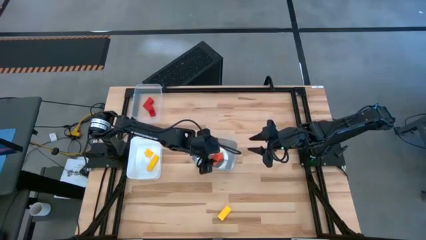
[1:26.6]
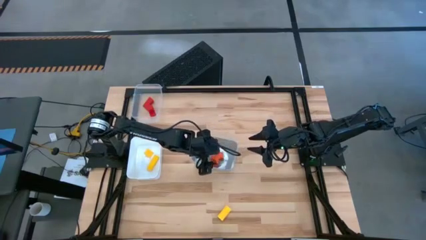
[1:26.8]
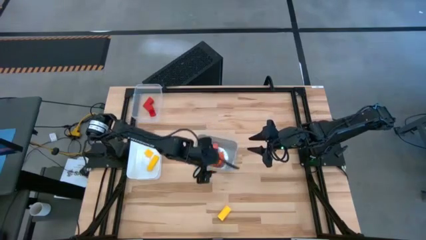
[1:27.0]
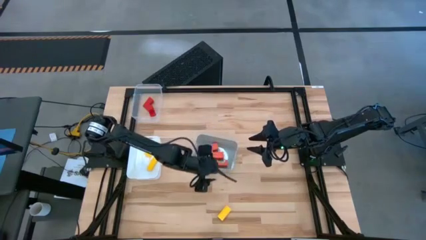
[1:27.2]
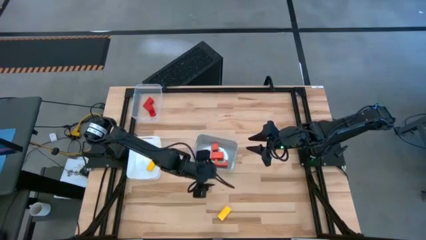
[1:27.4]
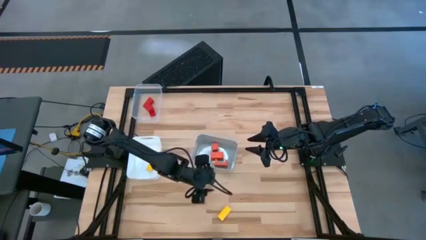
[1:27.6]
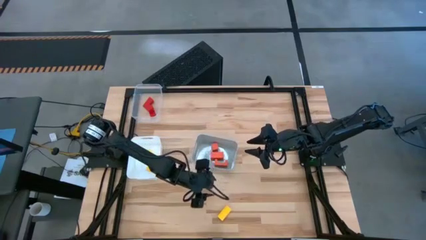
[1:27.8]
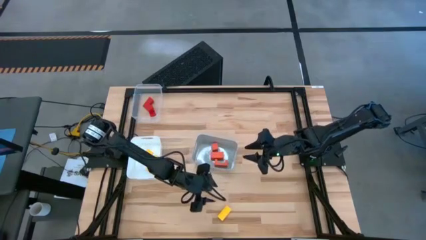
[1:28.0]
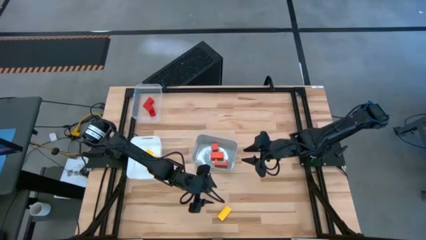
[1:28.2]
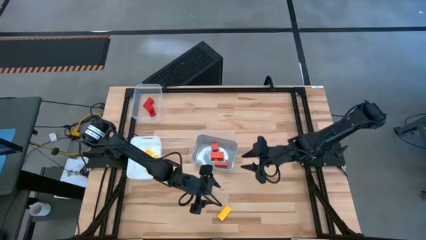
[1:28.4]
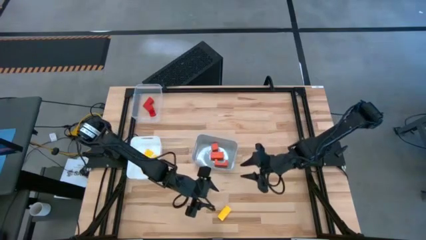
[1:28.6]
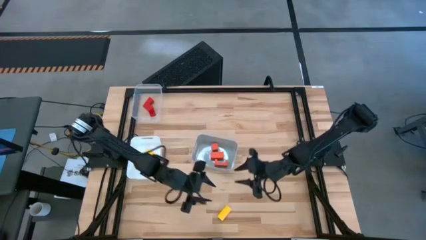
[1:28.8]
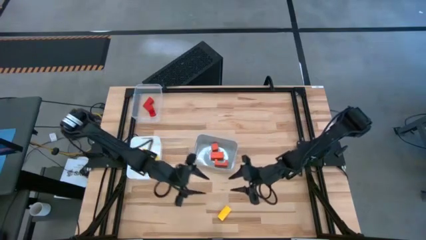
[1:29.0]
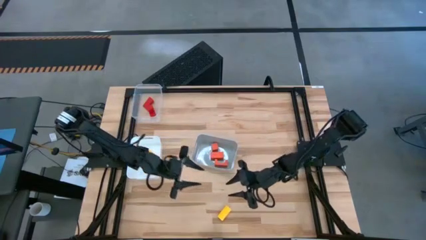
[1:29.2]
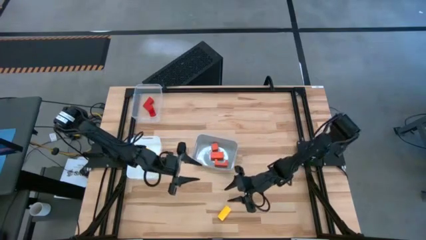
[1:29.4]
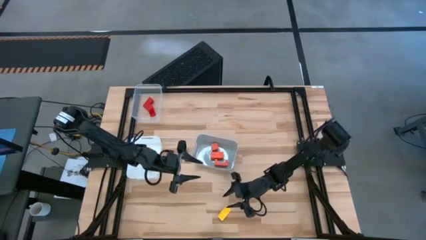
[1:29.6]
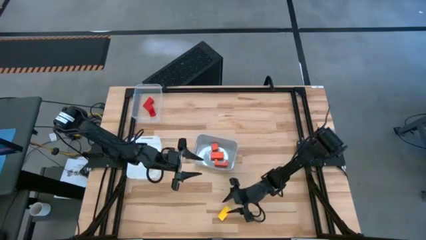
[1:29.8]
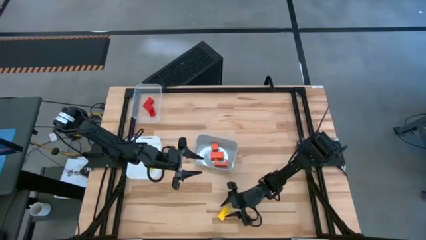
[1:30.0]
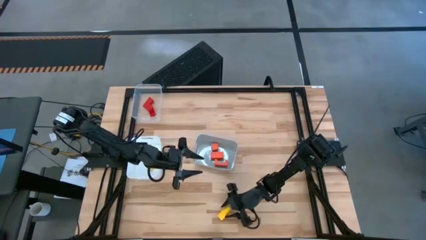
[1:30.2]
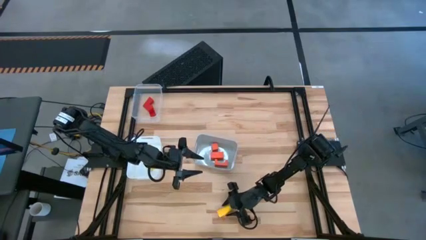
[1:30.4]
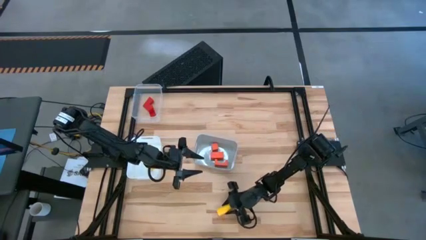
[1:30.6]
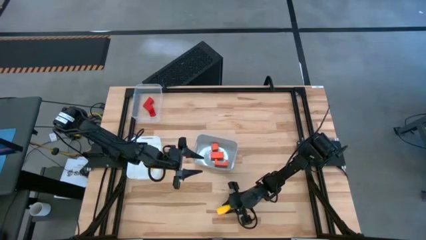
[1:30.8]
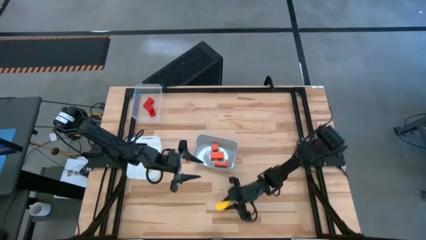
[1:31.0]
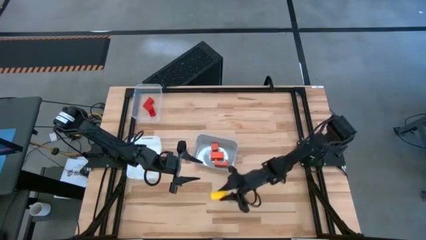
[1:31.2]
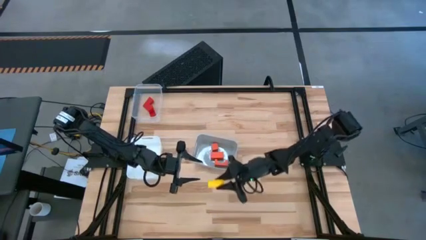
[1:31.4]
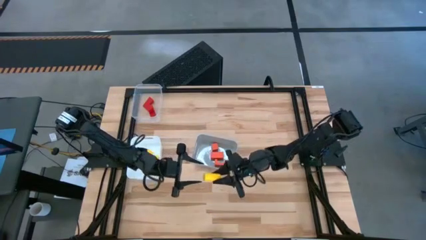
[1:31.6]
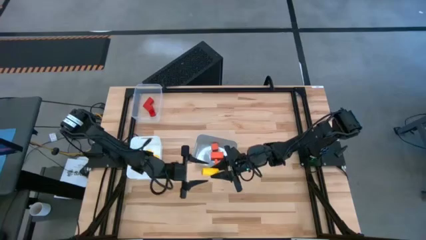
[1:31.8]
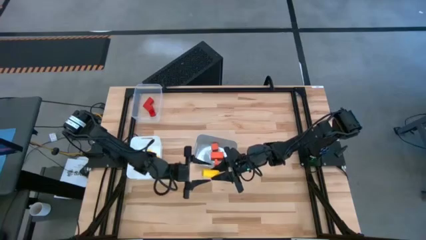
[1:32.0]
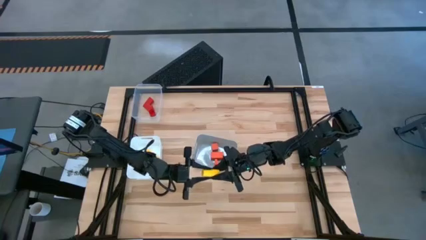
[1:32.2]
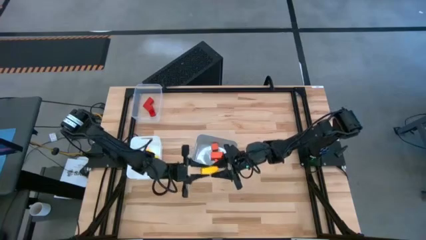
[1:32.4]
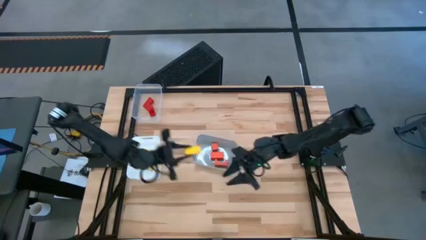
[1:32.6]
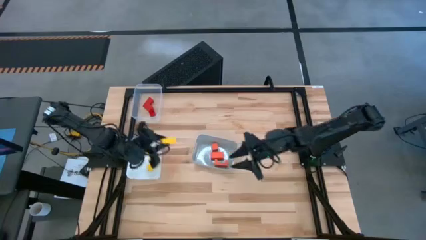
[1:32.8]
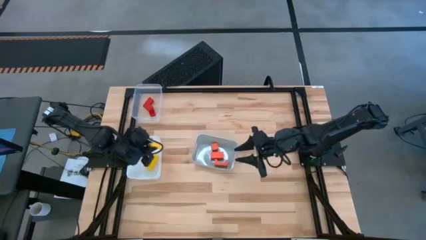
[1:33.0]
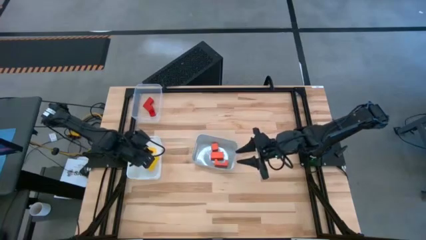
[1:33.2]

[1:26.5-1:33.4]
Task: Sort & place blocks by color
Put the yellow wooden block into the white bin

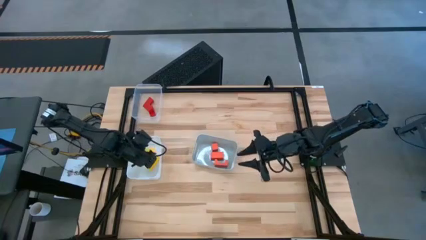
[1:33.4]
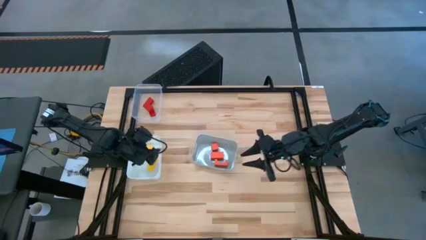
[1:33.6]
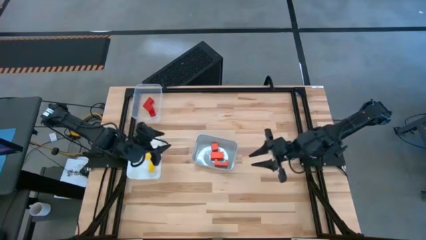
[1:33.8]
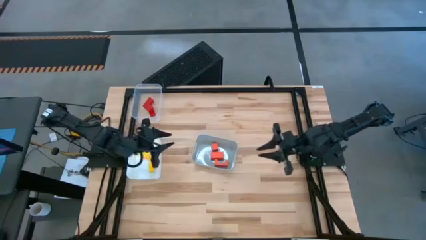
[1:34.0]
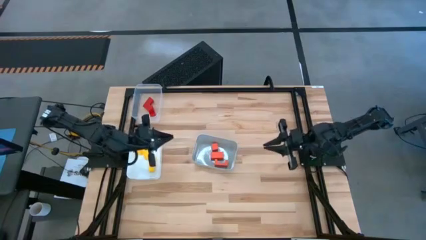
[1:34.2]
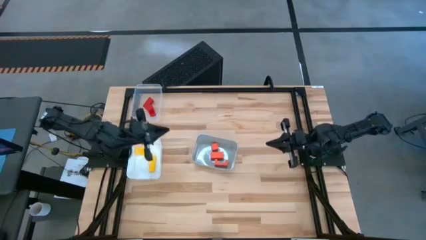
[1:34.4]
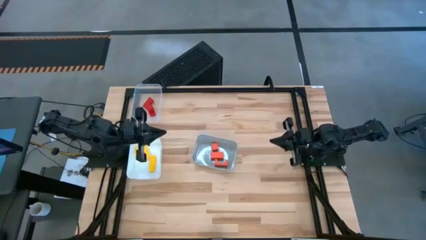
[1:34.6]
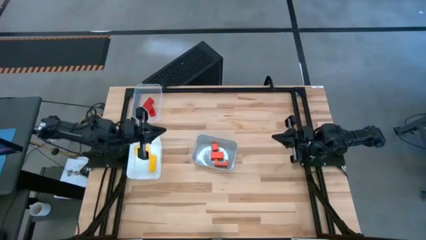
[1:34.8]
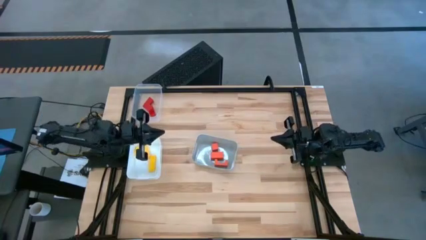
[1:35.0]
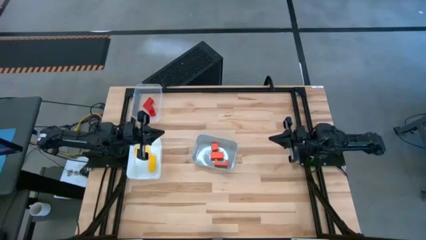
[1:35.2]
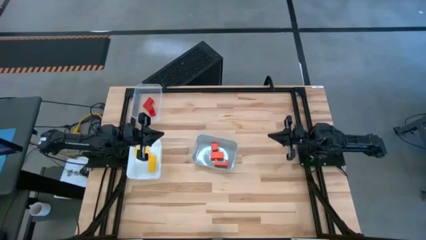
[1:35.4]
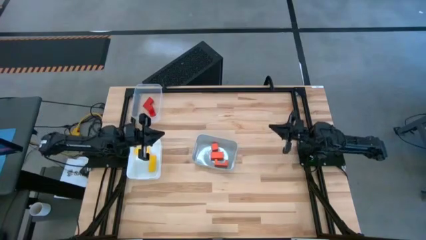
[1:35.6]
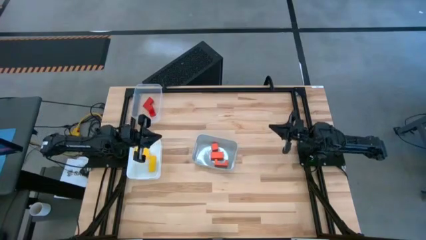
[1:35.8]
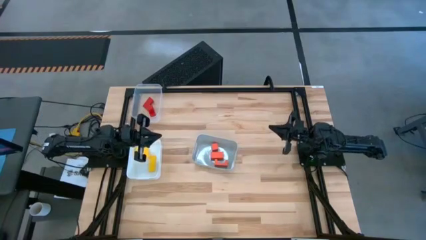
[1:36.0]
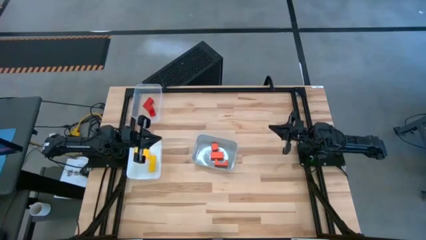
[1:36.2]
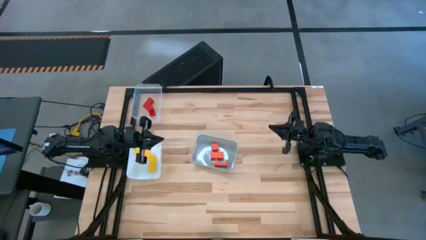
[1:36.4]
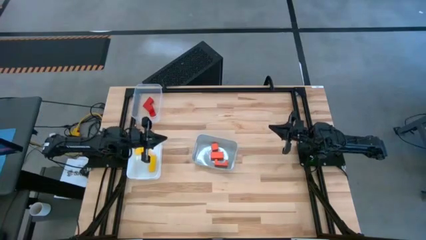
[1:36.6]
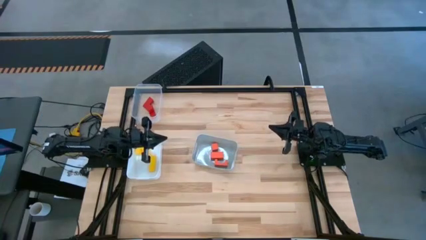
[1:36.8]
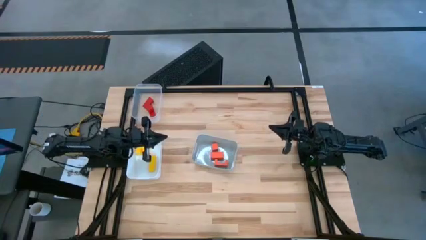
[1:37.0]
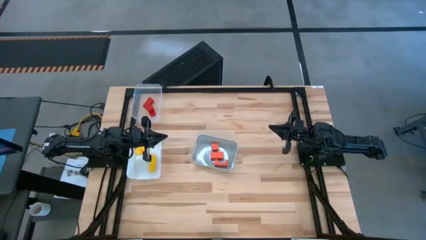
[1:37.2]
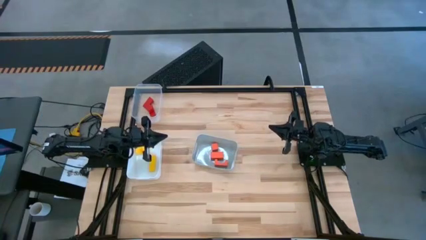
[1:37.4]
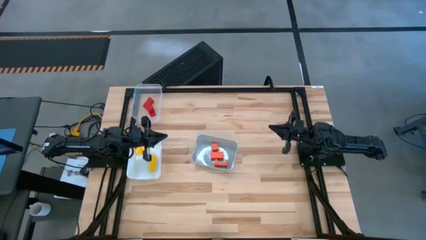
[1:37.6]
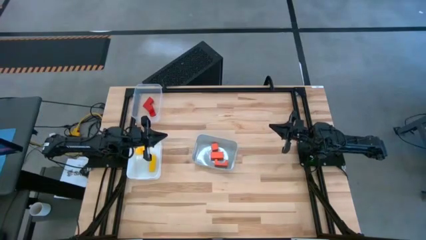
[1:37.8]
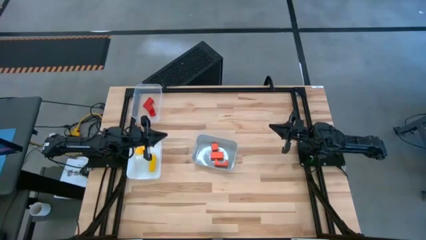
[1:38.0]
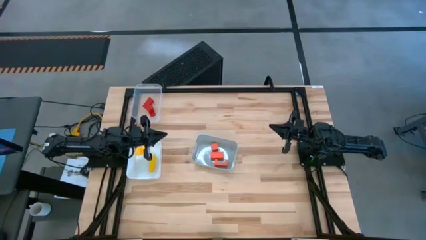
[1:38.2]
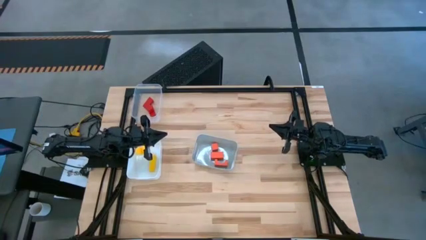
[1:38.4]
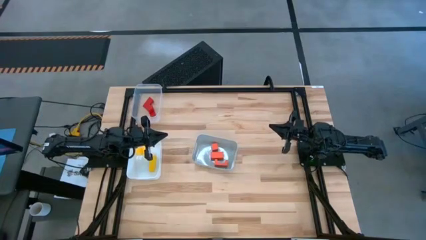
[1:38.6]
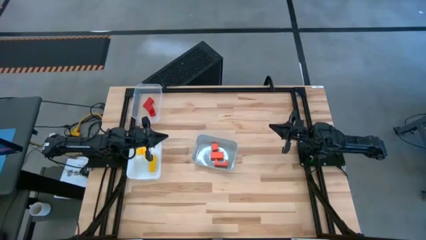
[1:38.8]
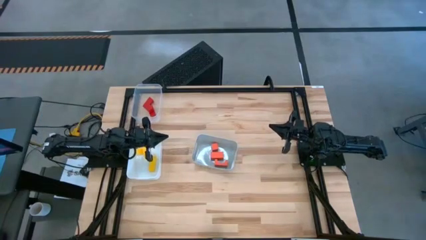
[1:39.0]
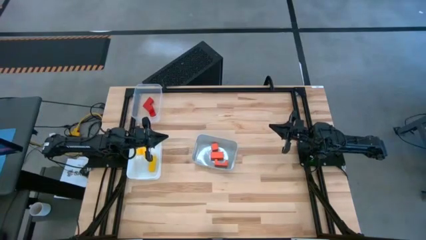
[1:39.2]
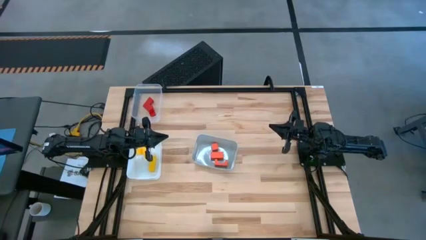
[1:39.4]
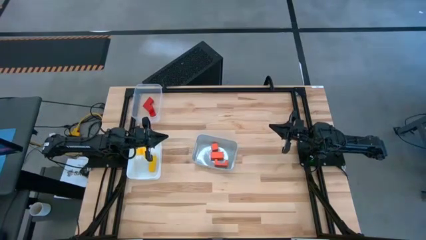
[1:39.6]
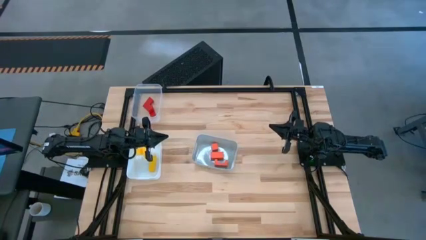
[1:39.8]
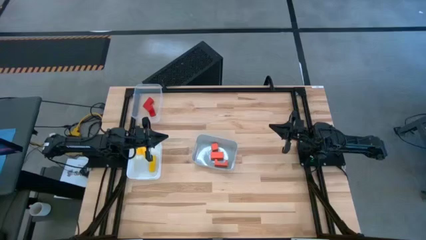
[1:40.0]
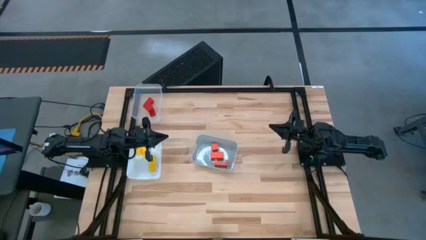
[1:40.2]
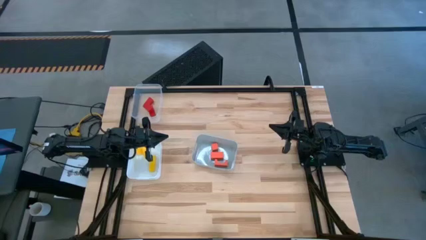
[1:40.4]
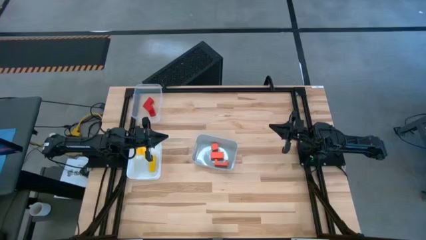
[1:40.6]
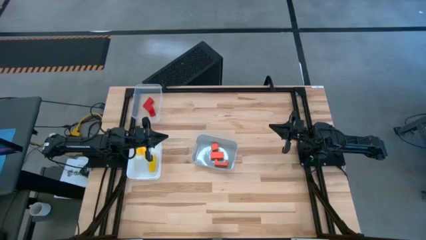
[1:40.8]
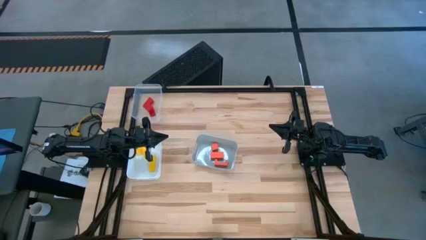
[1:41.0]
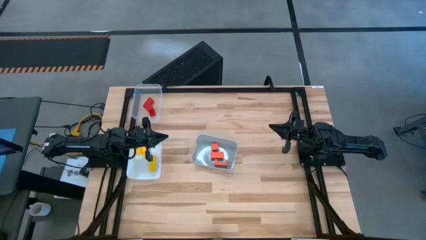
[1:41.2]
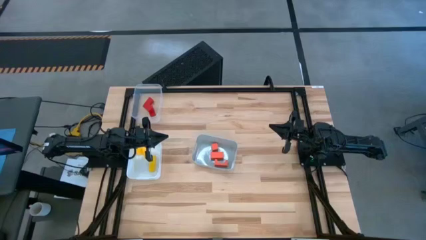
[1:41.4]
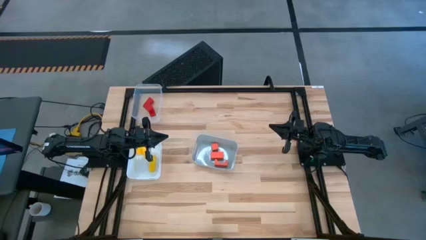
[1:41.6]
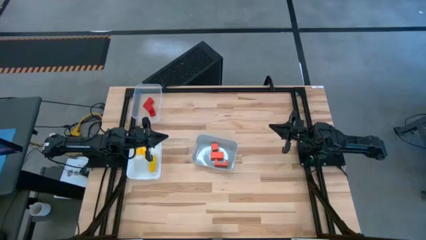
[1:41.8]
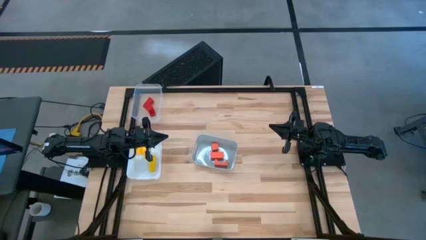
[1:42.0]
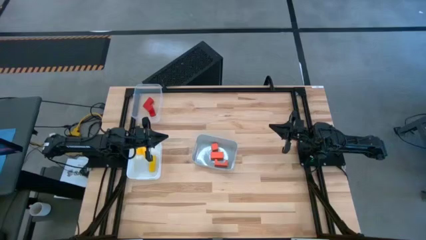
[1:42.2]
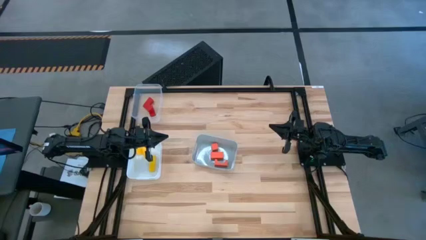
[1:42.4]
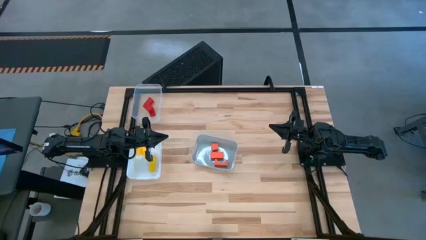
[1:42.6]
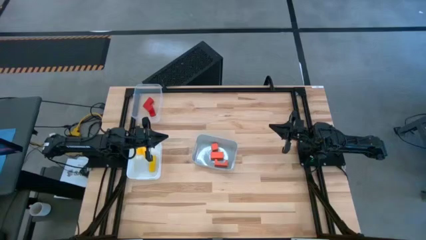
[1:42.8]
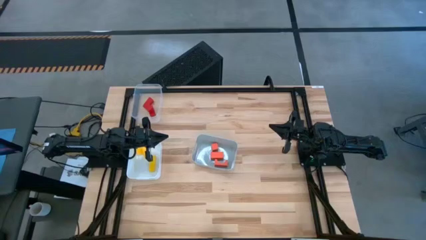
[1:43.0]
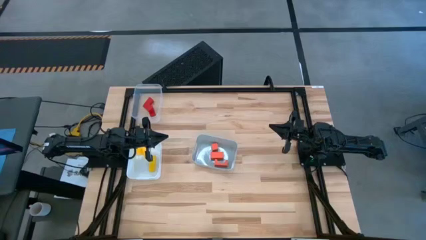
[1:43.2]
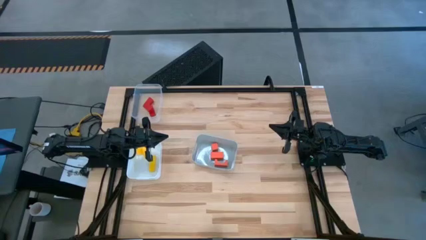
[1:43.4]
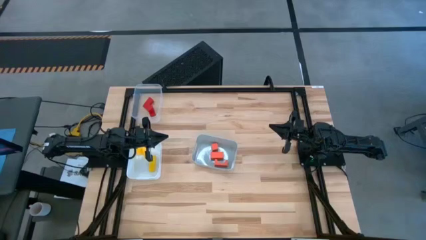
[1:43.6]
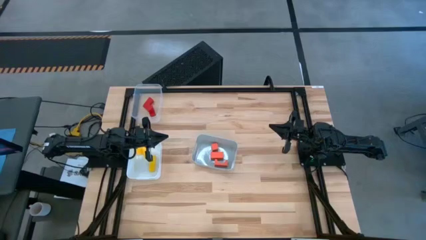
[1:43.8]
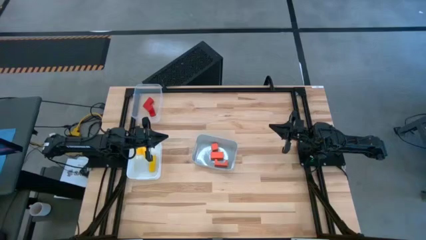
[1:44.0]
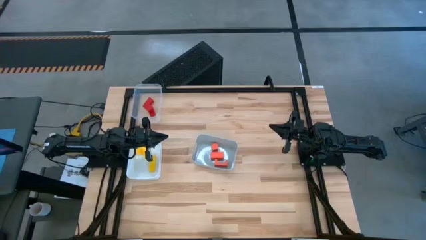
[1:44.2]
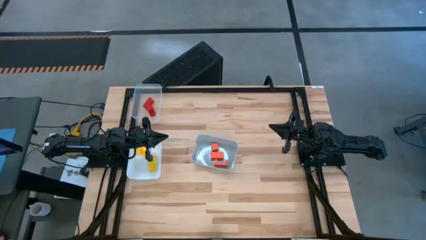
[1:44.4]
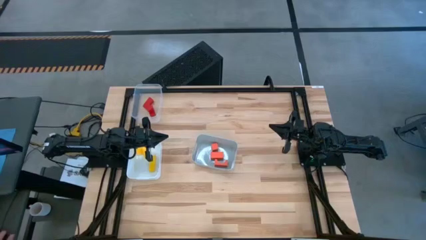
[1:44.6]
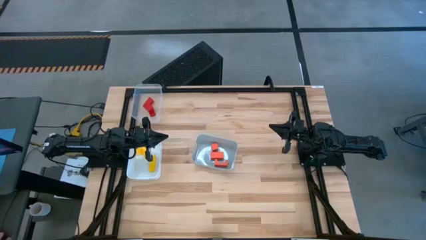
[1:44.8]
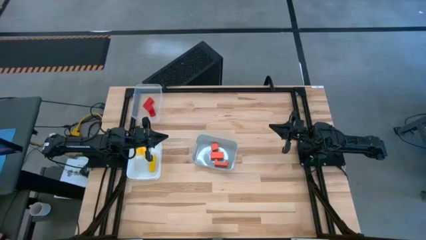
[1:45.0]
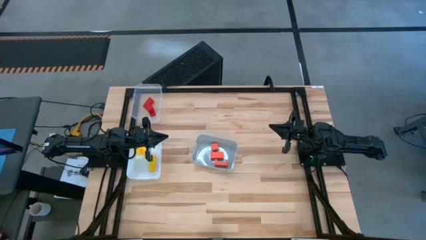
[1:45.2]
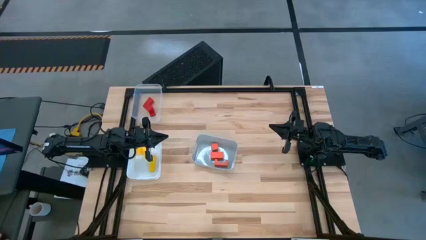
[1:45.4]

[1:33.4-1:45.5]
Return to Home Position
